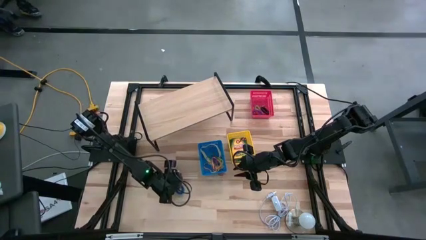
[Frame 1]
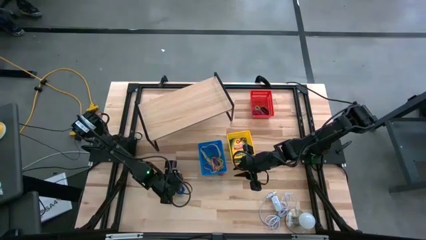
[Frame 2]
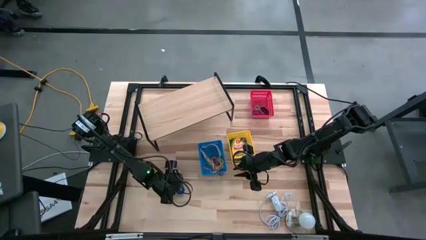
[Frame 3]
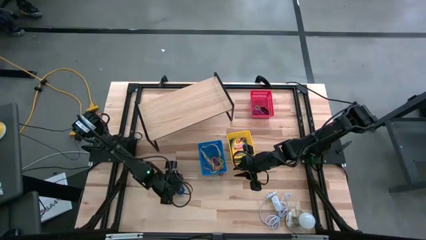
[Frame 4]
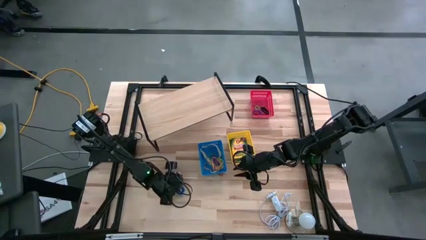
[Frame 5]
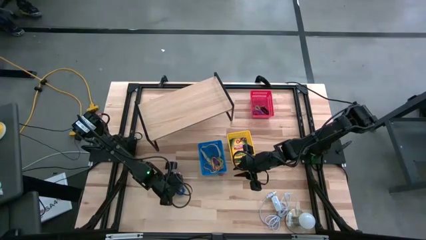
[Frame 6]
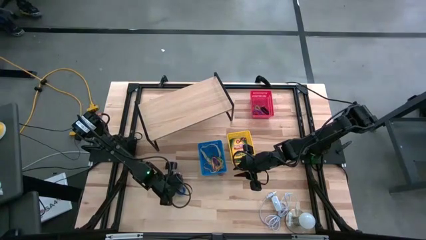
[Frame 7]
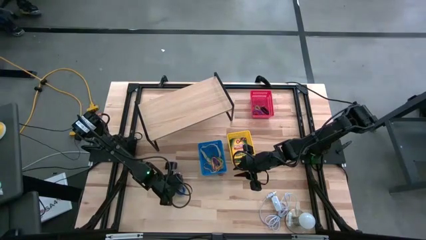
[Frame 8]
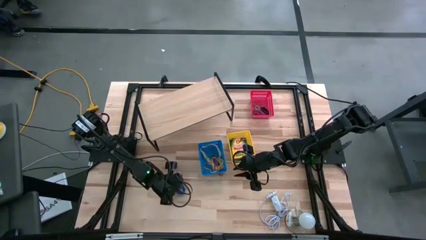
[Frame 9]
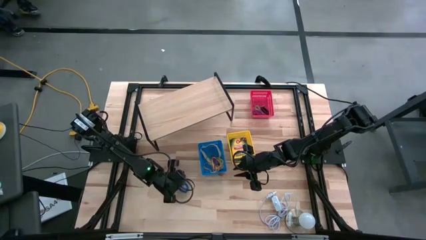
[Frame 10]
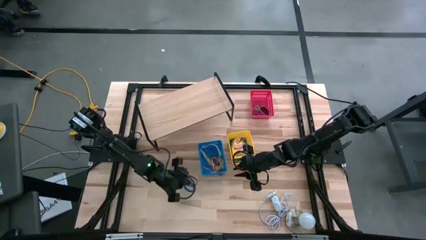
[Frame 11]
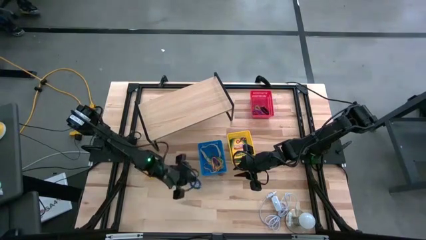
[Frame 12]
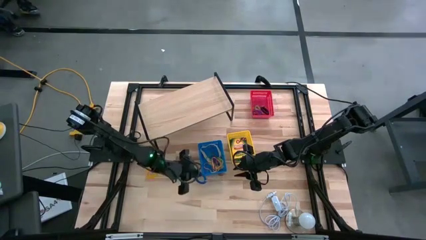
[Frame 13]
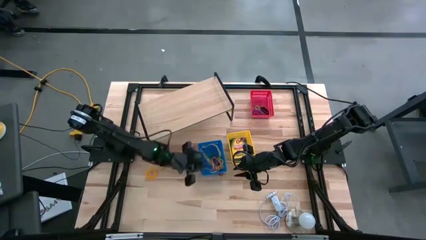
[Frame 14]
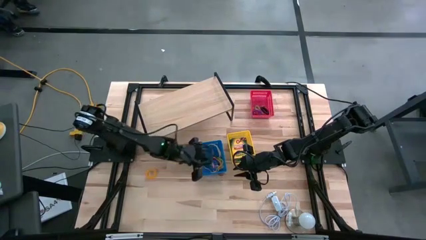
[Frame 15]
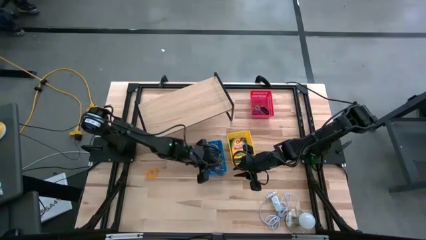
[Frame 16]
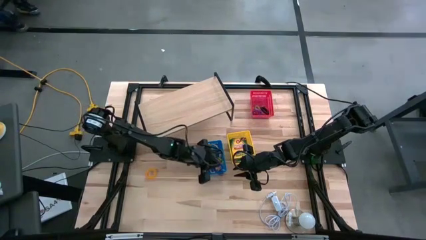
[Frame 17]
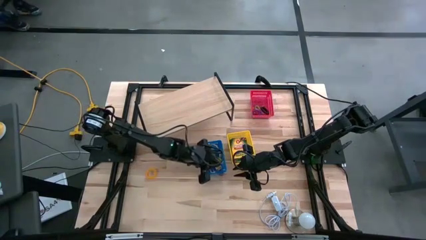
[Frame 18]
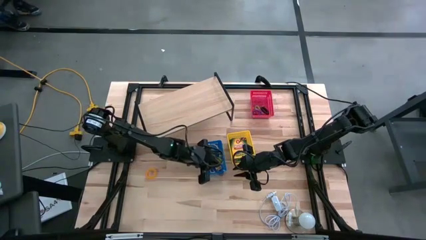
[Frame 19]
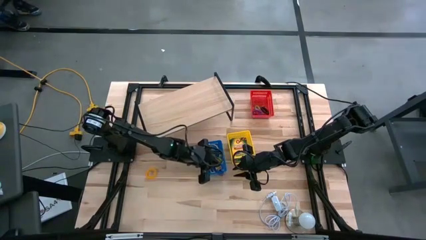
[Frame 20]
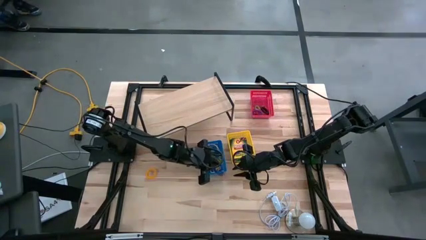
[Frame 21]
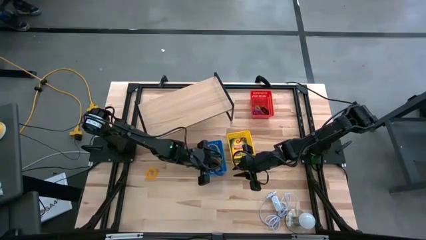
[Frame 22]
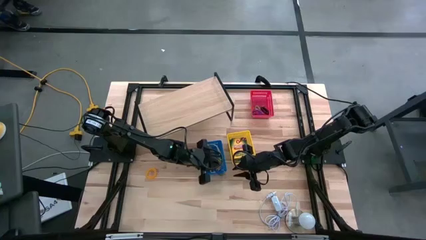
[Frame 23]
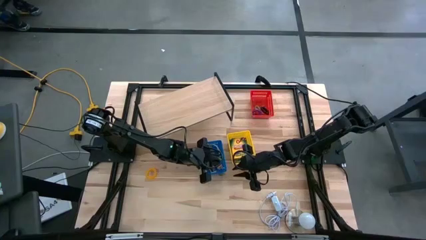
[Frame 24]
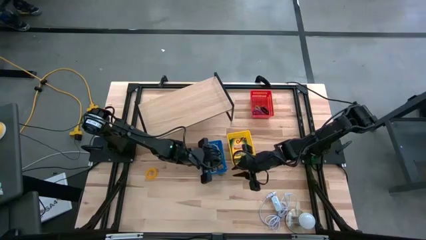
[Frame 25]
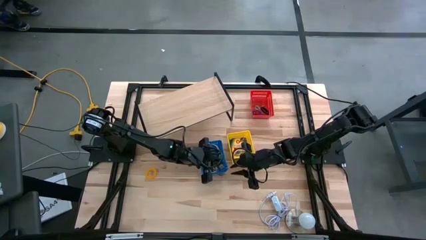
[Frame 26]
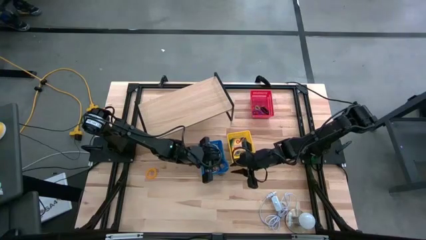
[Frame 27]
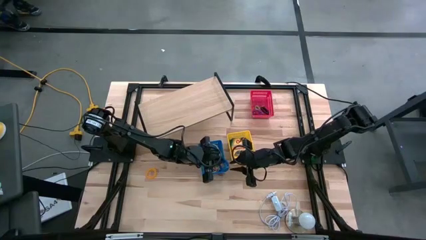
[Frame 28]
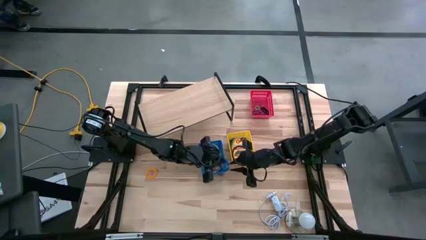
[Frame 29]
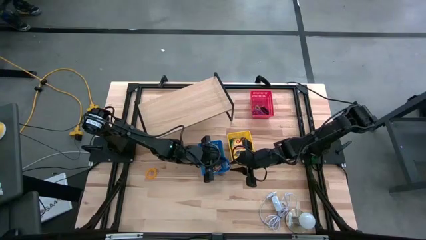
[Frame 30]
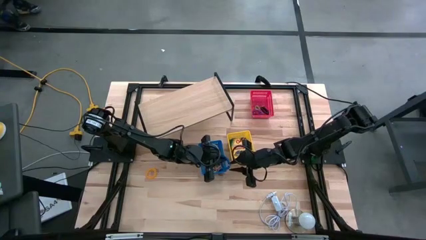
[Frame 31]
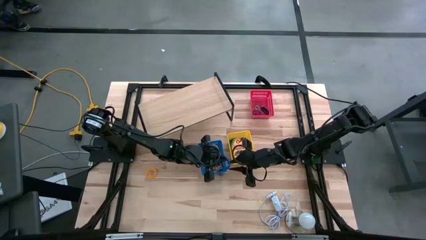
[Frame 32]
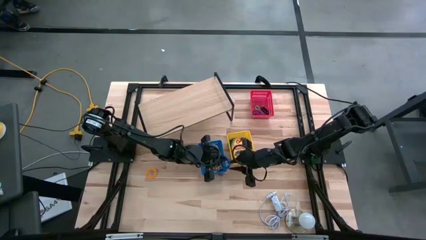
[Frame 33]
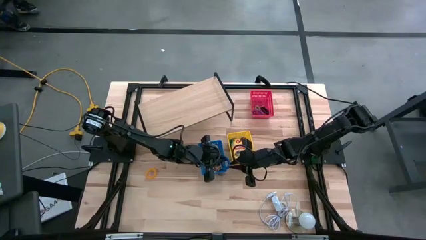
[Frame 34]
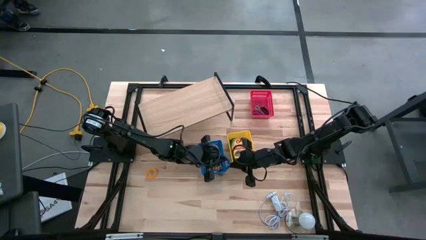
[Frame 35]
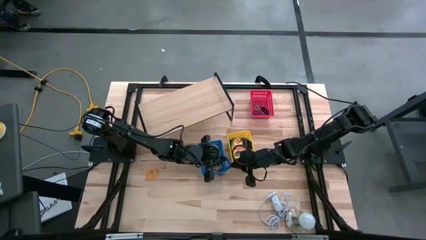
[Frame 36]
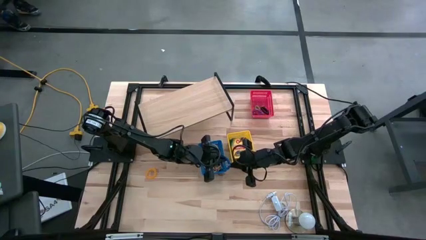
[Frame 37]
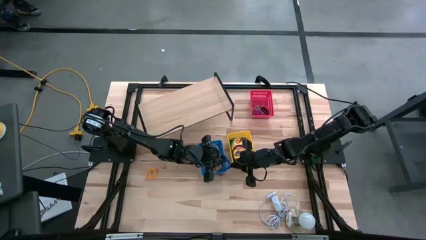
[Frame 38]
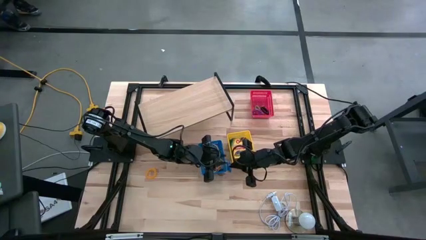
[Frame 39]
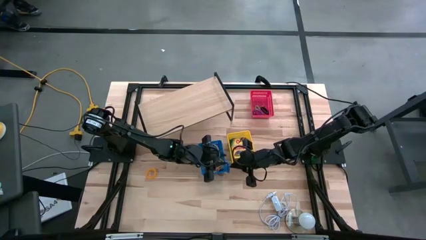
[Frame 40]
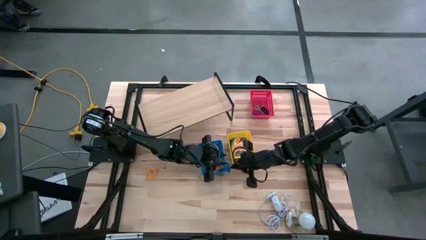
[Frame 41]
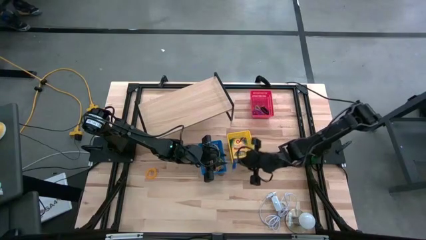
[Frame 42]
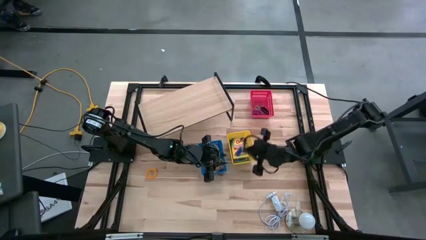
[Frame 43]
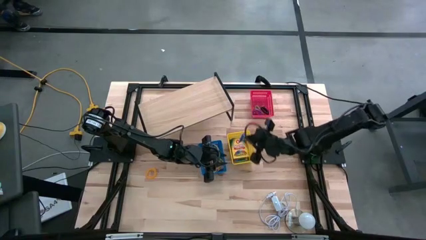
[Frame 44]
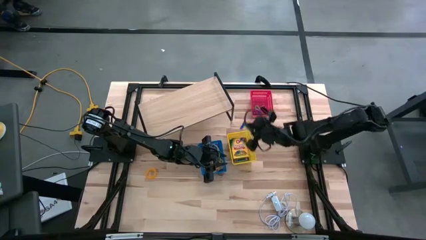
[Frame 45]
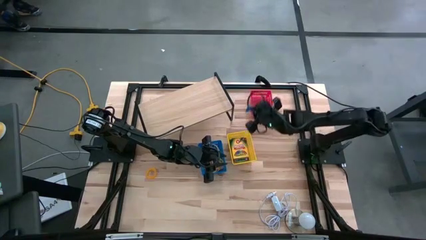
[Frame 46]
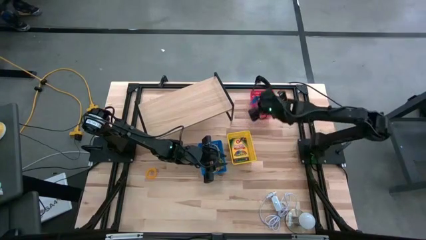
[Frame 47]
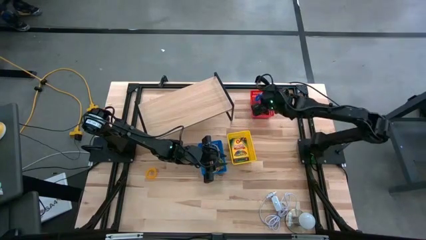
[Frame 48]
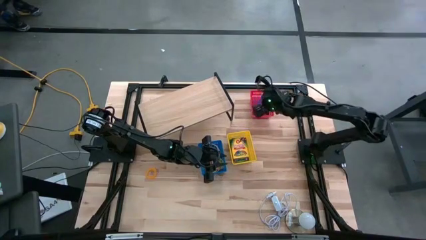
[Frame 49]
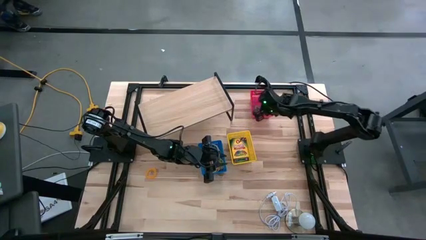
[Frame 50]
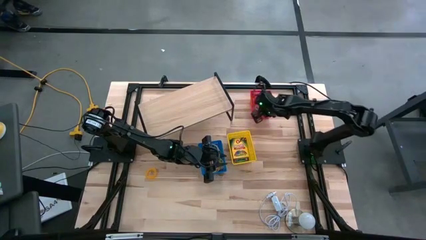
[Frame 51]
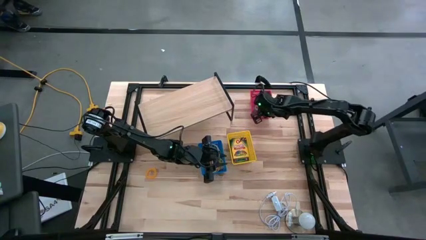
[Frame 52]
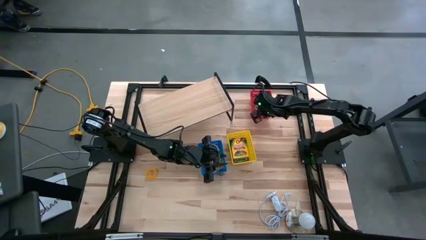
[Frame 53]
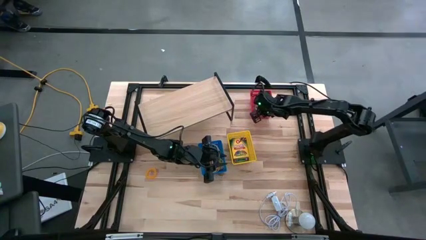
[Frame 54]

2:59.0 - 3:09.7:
Task: Pick & Place Office Desk Supplies
Put the blue spring keychain into the red bin
